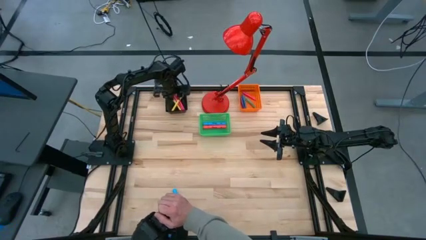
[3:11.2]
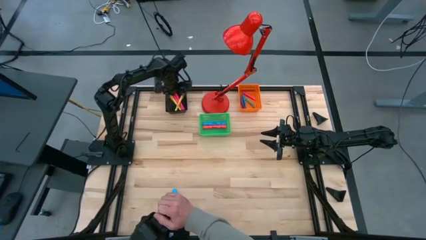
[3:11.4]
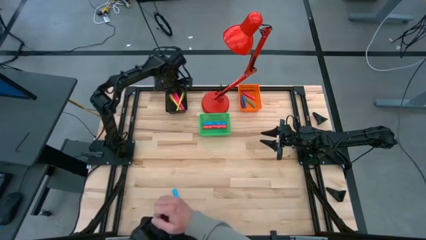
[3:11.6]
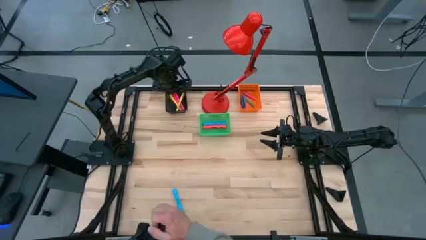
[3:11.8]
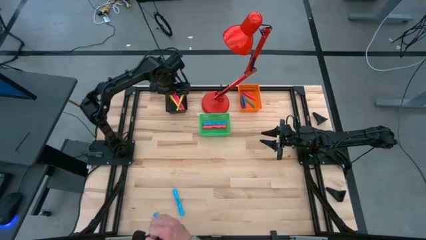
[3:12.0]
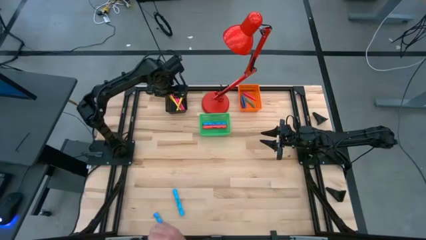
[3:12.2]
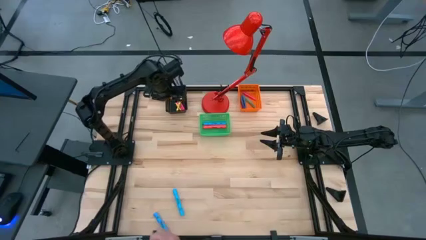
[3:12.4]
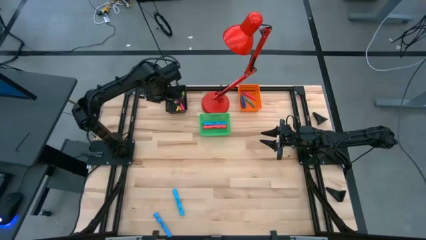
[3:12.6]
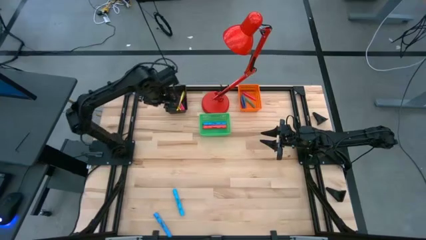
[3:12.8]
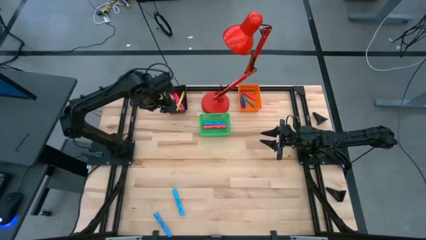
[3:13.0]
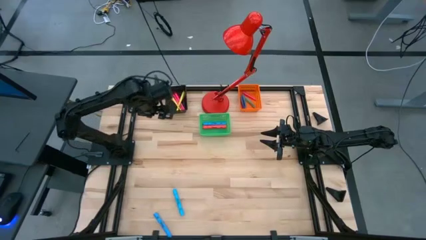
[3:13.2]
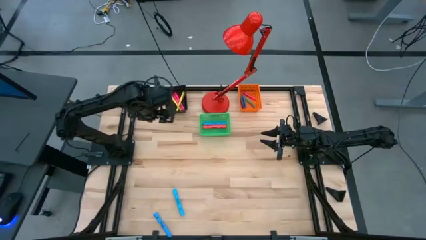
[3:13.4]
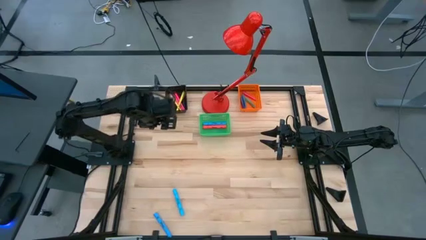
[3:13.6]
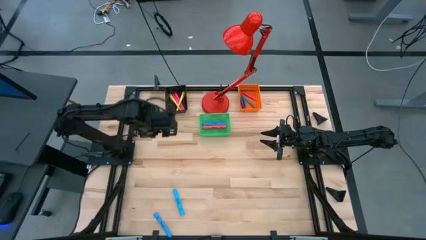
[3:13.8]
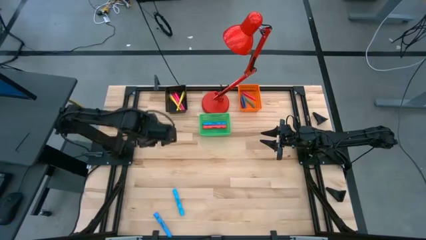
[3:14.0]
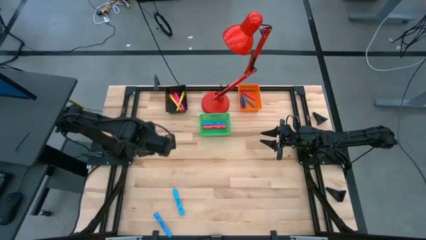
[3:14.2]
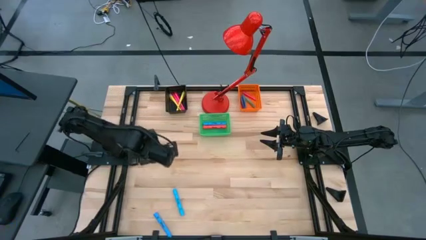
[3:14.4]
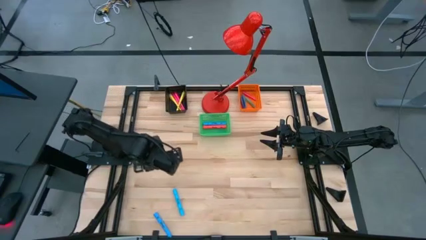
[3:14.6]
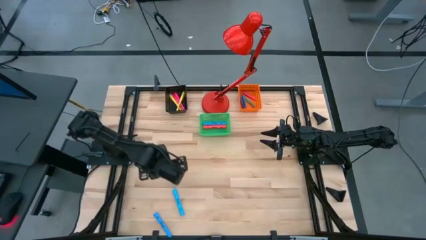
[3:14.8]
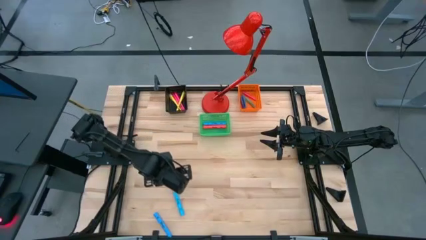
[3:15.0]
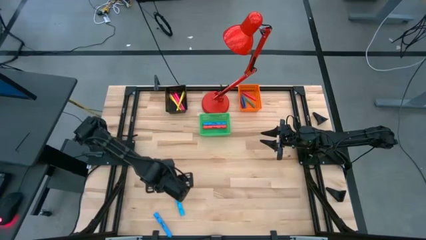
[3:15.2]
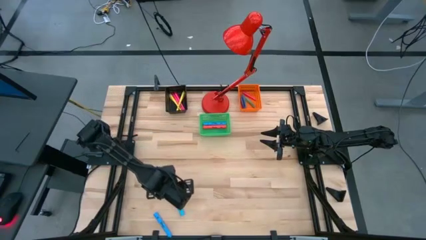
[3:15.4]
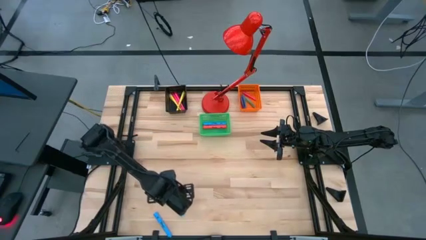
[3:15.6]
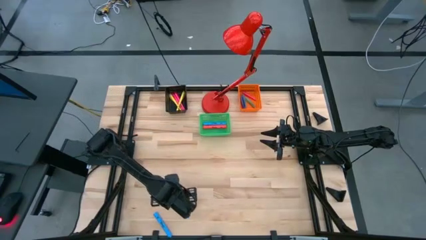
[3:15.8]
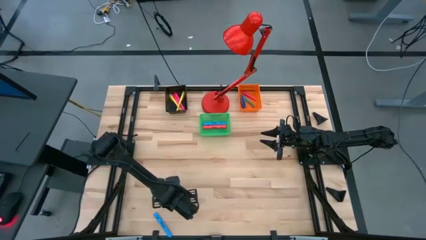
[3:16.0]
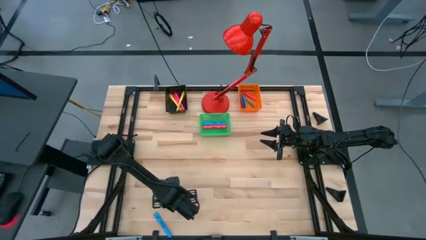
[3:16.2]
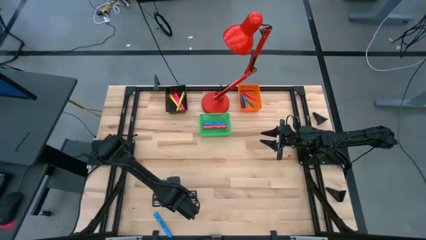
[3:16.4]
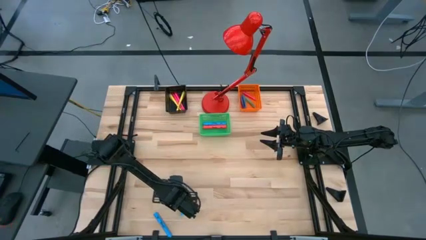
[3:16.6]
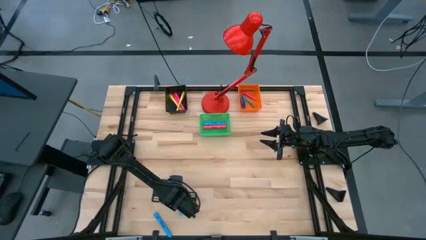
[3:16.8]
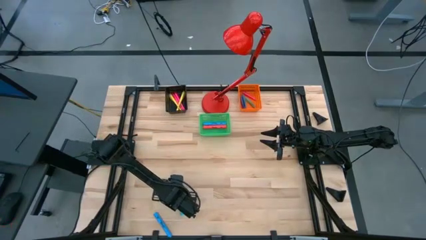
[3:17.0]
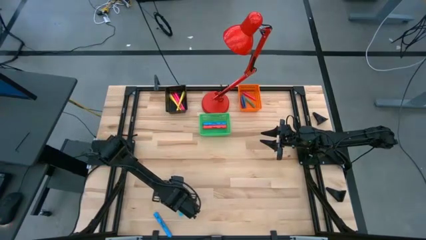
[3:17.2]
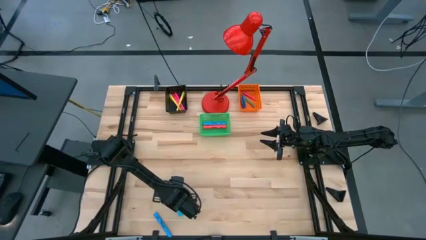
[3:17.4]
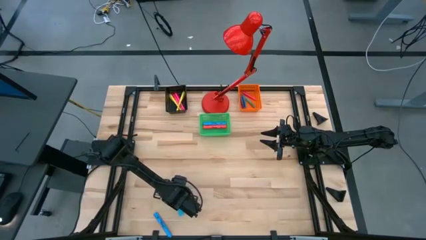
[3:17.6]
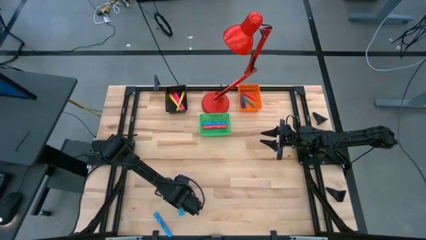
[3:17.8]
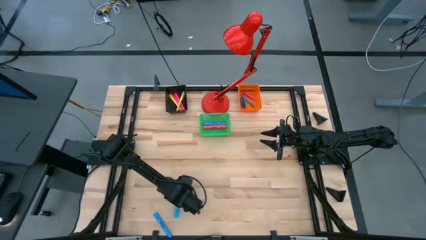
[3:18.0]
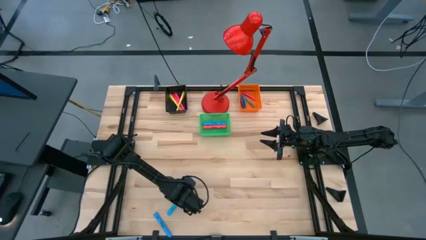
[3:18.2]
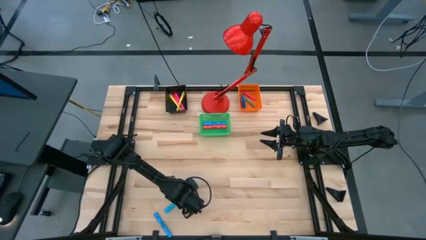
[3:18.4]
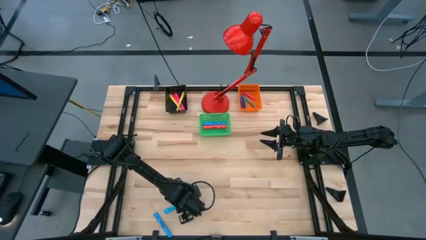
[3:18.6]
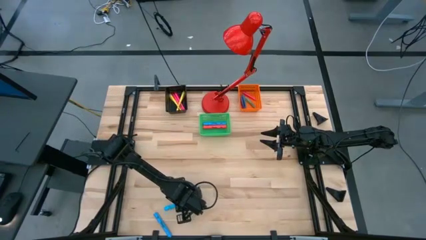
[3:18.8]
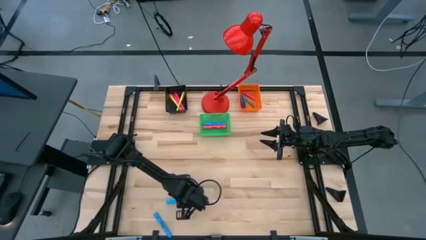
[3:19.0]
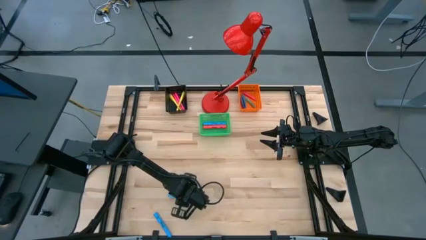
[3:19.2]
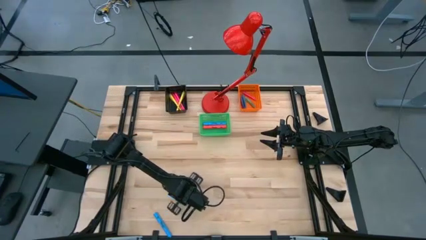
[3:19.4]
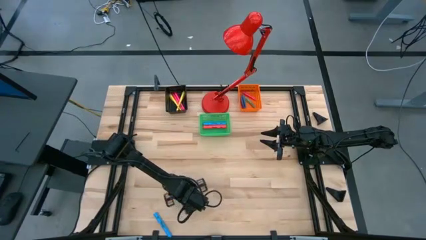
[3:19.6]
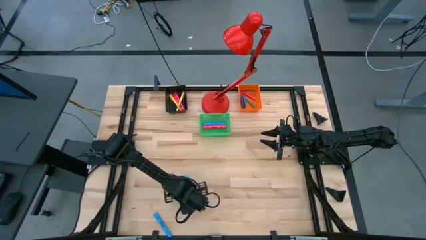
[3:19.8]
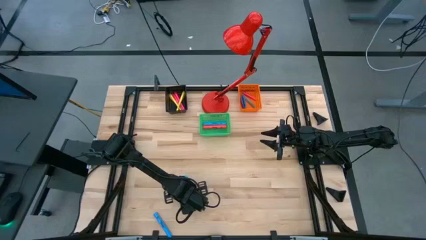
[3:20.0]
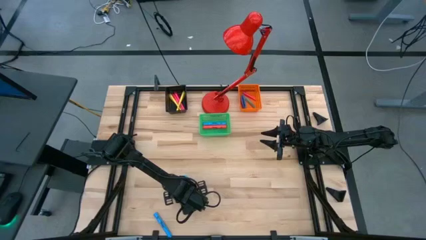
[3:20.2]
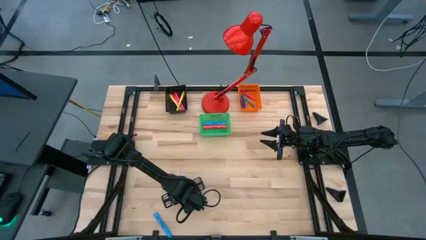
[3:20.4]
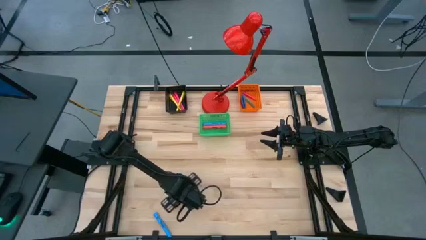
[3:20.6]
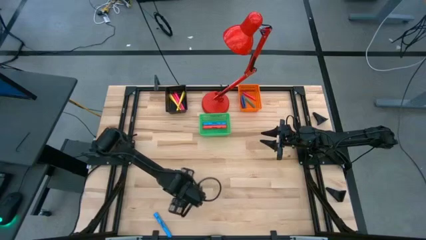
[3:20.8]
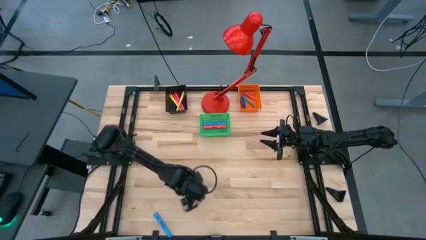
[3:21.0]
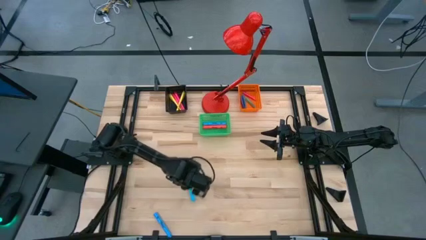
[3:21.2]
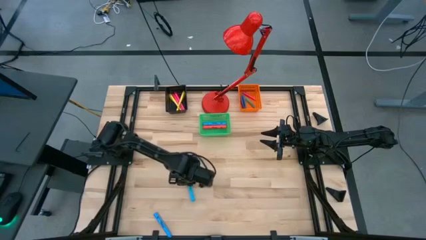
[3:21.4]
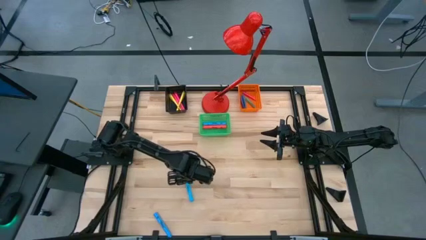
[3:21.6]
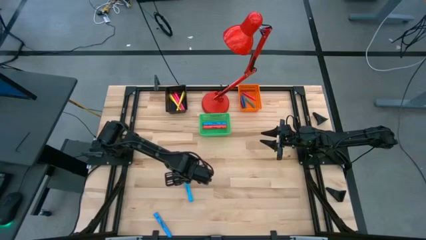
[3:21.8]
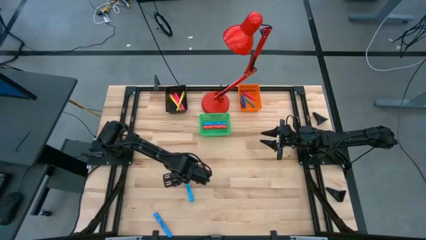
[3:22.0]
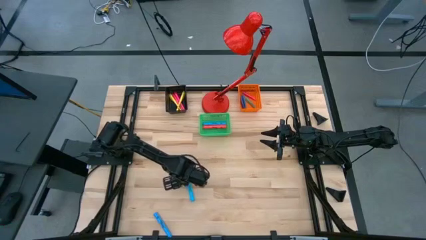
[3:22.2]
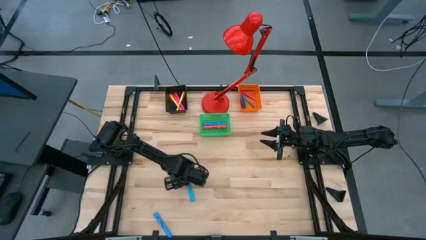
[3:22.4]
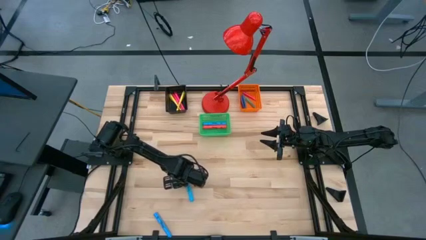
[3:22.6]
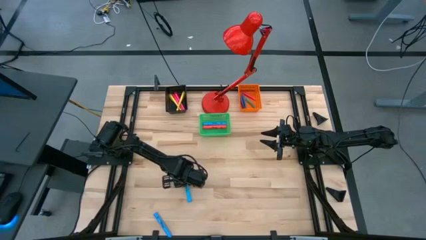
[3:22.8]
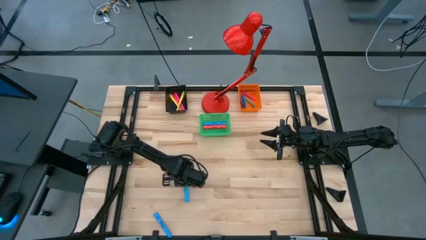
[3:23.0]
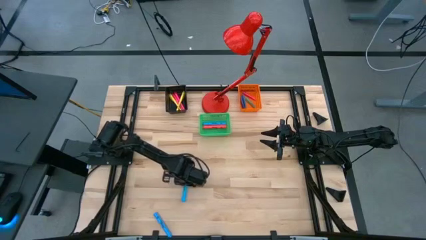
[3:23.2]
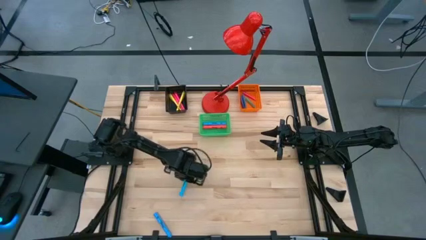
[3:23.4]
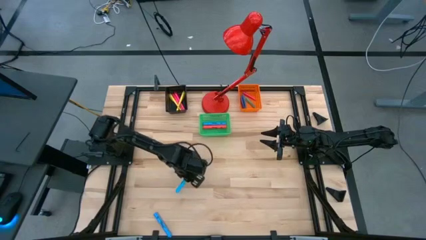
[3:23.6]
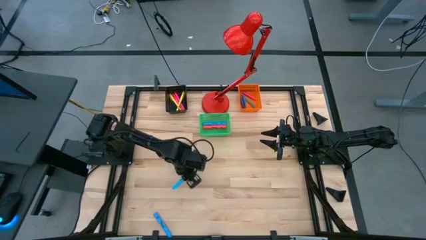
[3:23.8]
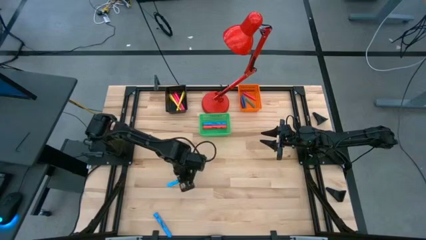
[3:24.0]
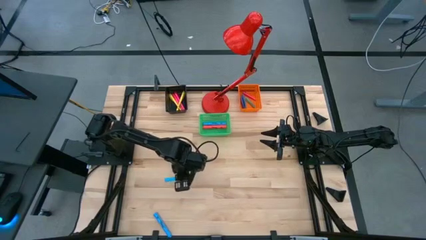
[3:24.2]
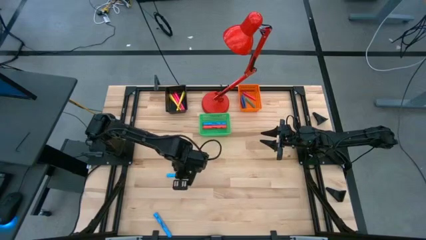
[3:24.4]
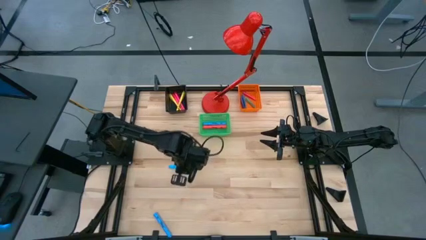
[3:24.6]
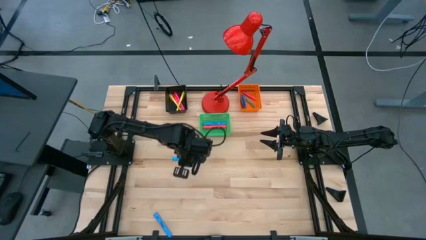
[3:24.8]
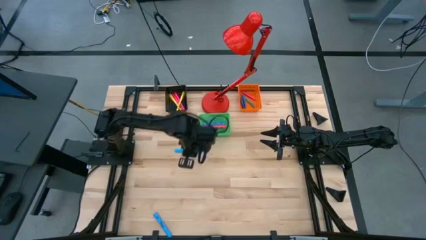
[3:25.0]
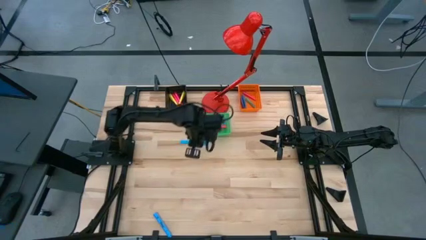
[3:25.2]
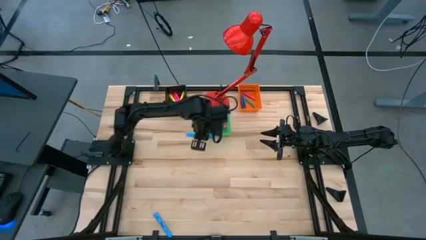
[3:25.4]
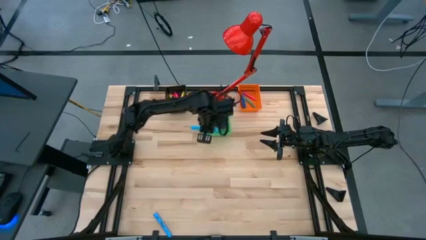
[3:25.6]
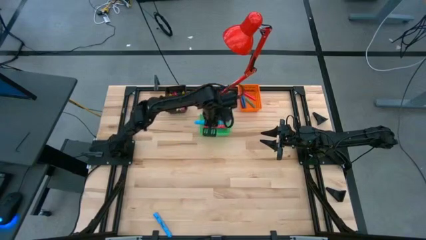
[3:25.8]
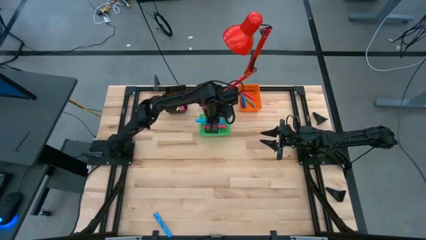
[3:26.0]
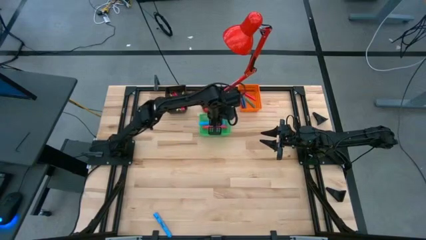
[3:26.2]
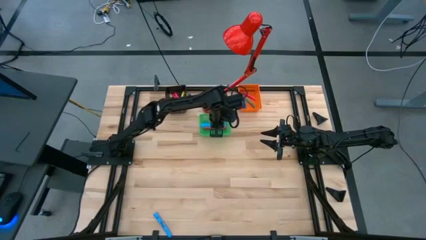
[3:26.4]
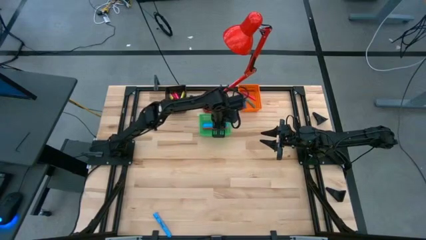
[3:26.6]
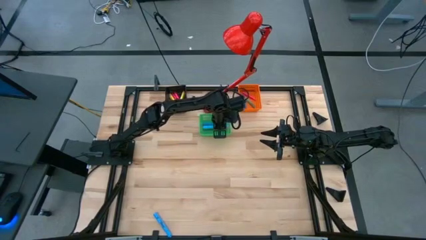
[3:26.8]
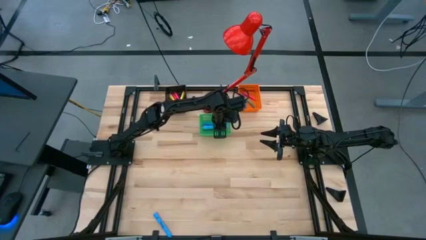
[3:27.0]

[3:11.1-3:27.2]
Task: Pick & Place Markers
Put the big blue highlighter into the green basket
